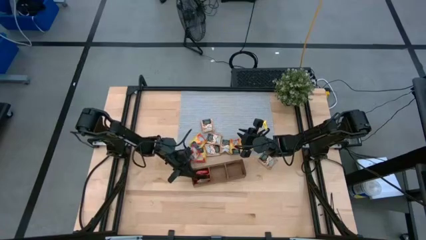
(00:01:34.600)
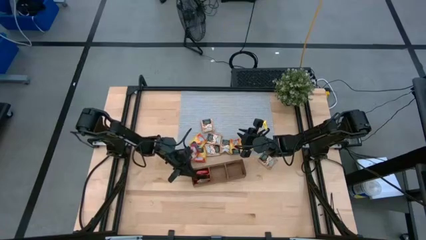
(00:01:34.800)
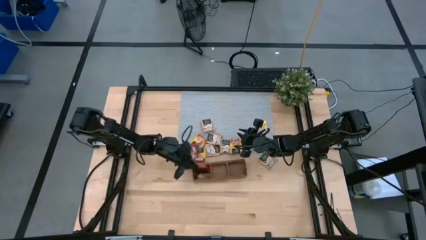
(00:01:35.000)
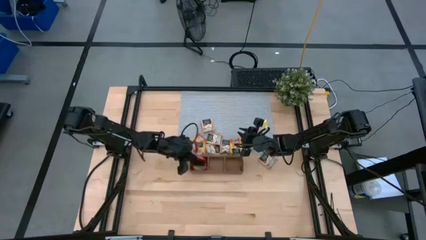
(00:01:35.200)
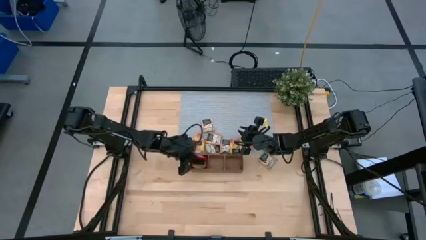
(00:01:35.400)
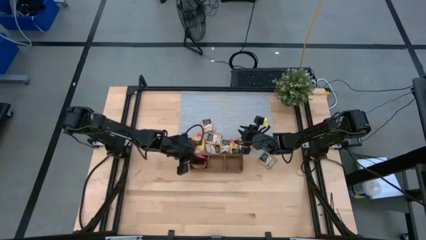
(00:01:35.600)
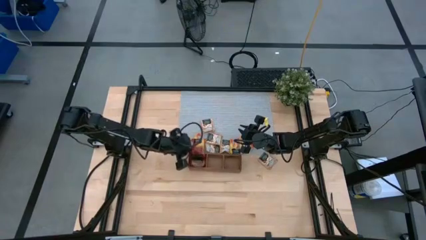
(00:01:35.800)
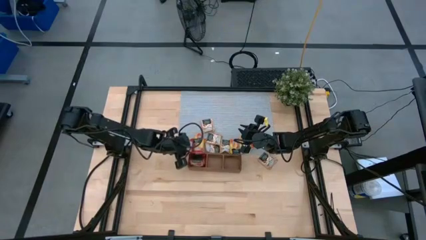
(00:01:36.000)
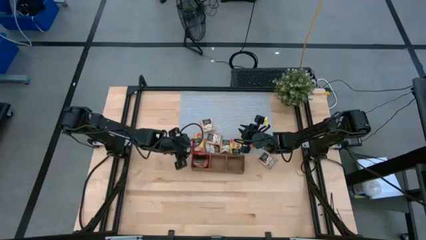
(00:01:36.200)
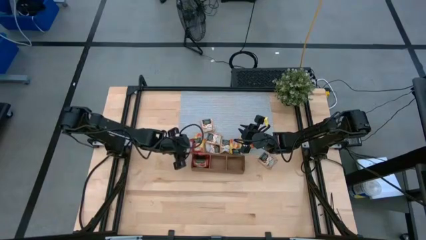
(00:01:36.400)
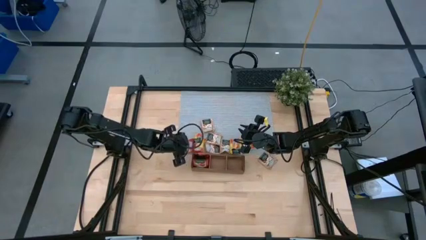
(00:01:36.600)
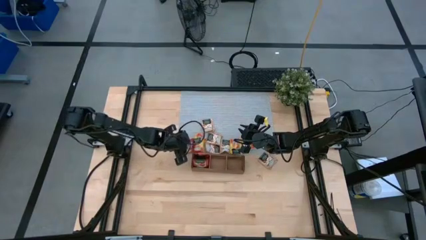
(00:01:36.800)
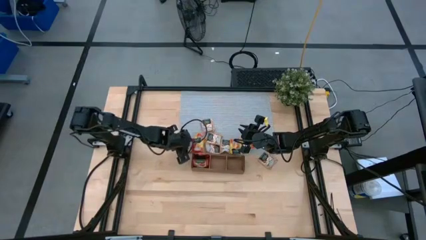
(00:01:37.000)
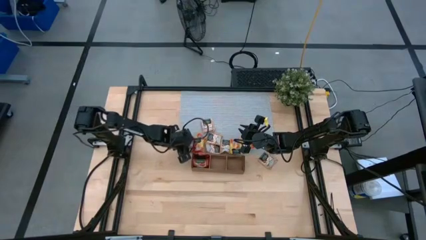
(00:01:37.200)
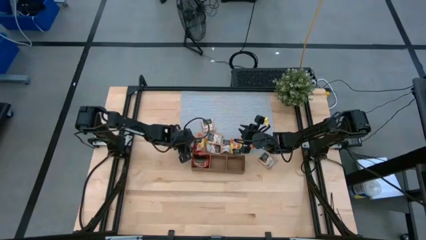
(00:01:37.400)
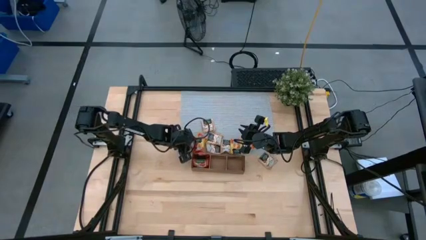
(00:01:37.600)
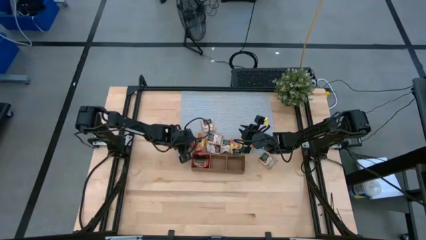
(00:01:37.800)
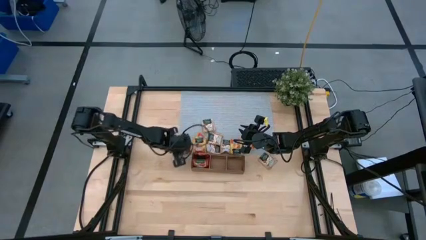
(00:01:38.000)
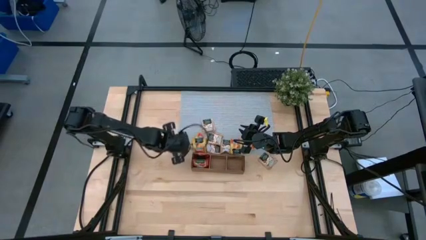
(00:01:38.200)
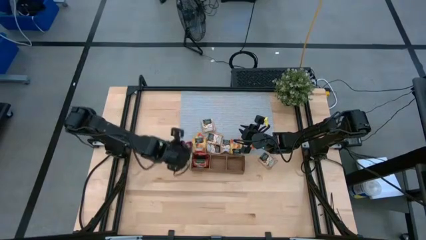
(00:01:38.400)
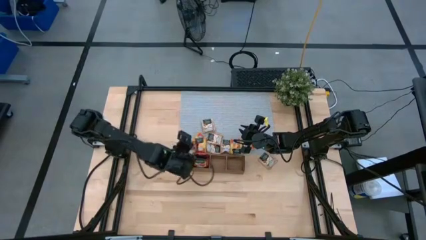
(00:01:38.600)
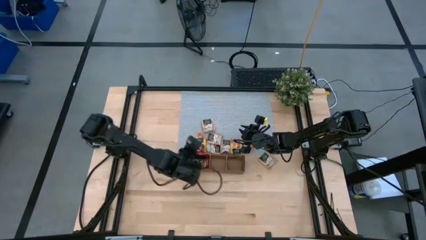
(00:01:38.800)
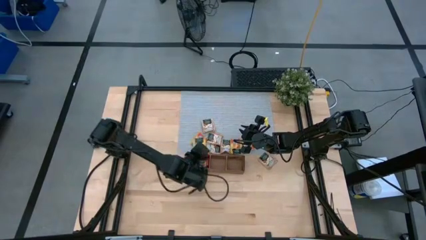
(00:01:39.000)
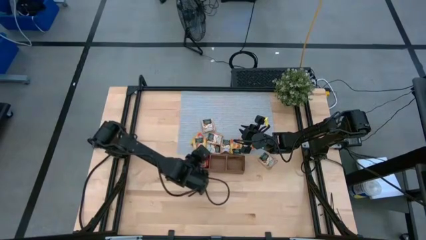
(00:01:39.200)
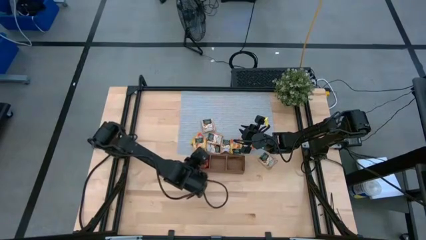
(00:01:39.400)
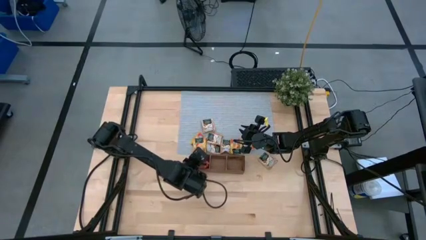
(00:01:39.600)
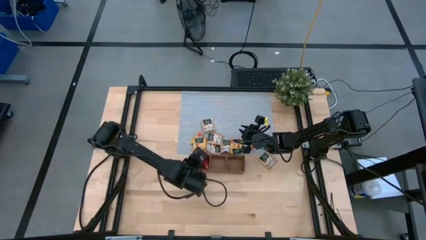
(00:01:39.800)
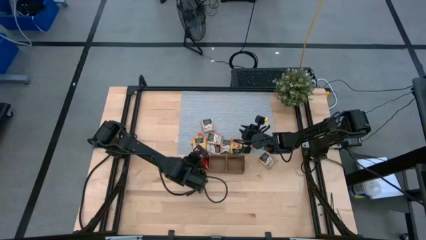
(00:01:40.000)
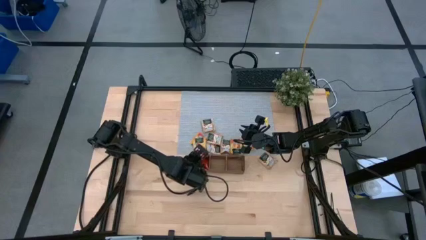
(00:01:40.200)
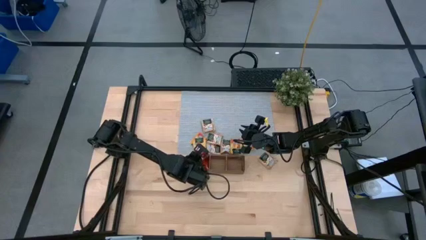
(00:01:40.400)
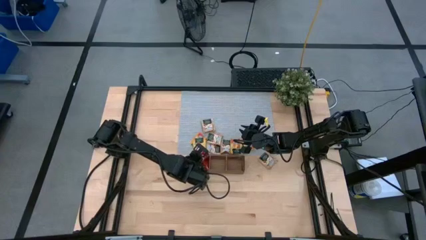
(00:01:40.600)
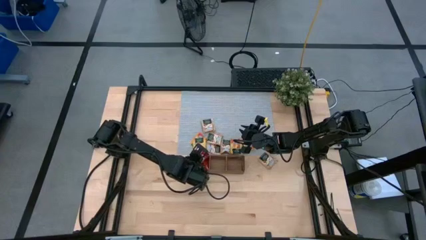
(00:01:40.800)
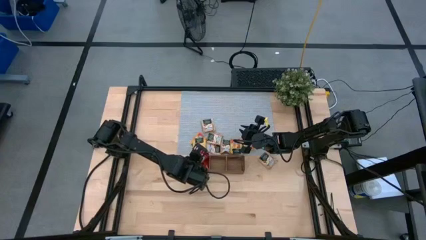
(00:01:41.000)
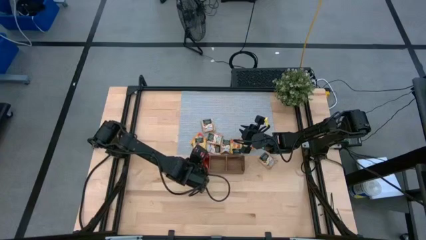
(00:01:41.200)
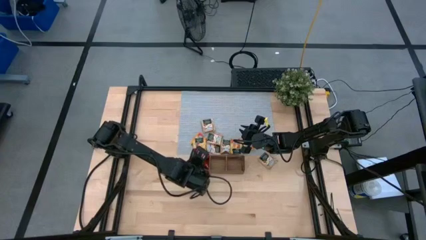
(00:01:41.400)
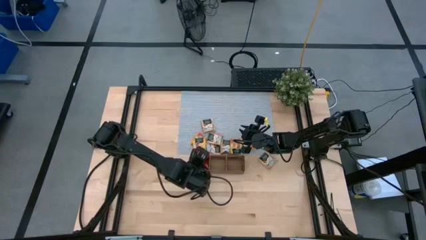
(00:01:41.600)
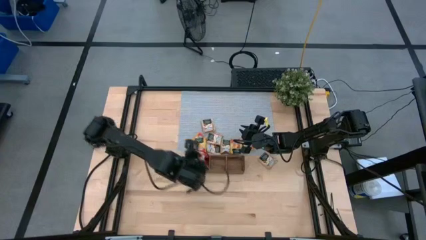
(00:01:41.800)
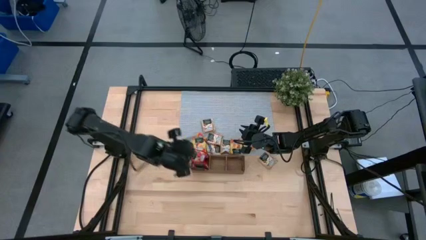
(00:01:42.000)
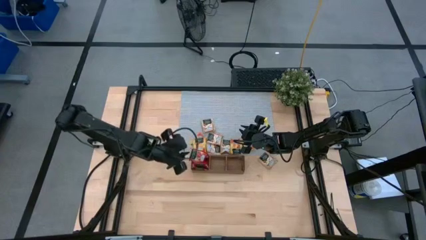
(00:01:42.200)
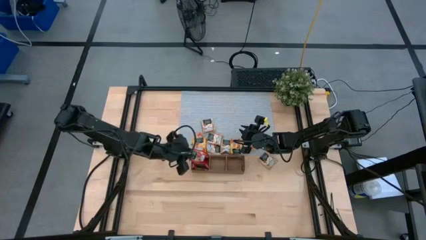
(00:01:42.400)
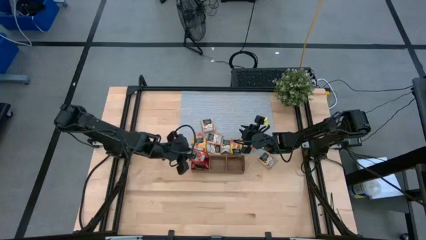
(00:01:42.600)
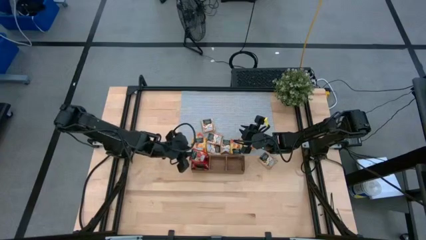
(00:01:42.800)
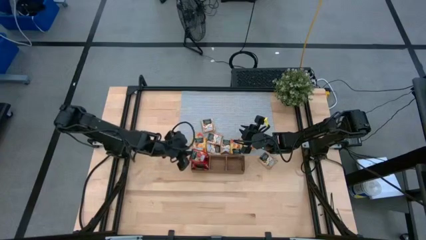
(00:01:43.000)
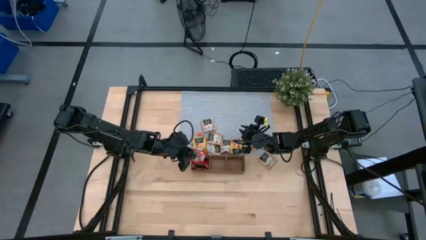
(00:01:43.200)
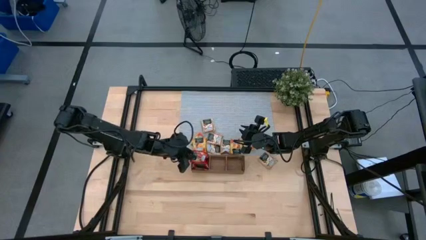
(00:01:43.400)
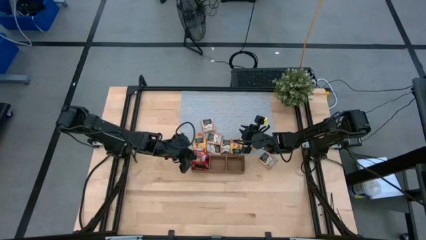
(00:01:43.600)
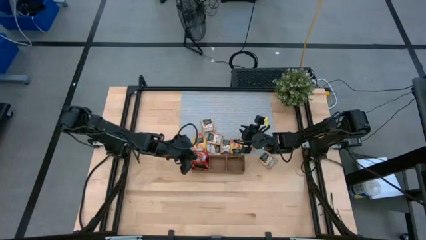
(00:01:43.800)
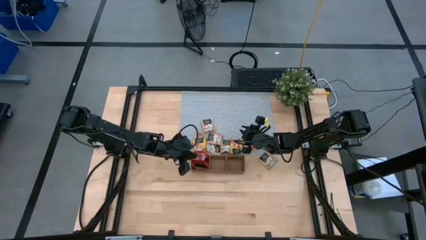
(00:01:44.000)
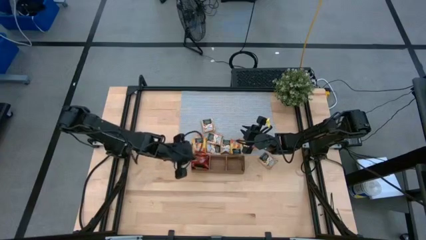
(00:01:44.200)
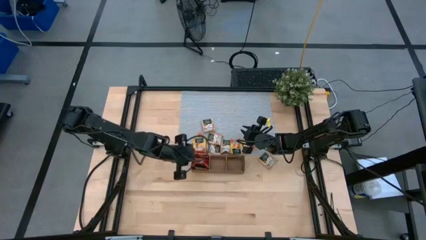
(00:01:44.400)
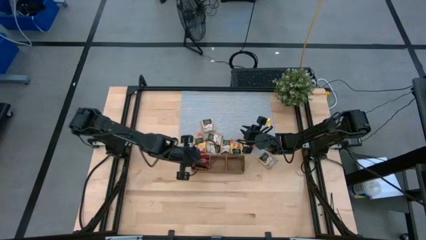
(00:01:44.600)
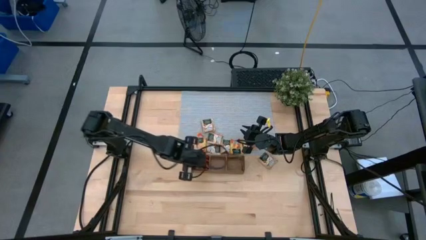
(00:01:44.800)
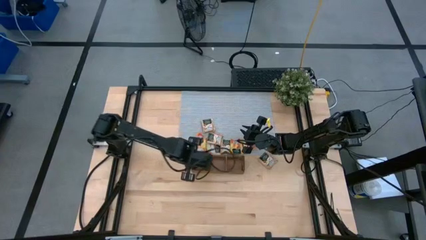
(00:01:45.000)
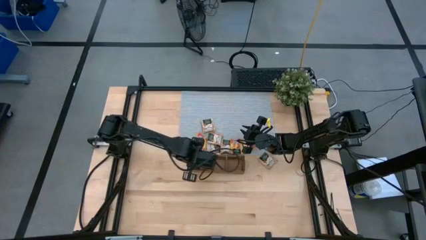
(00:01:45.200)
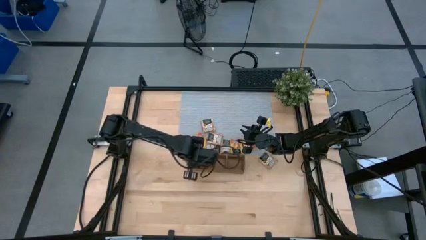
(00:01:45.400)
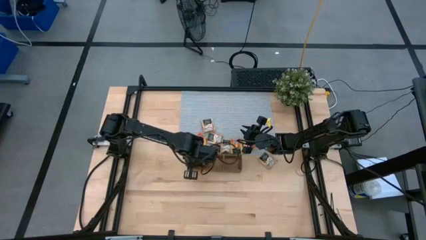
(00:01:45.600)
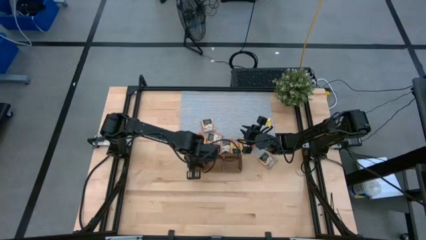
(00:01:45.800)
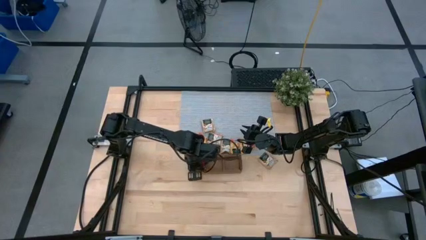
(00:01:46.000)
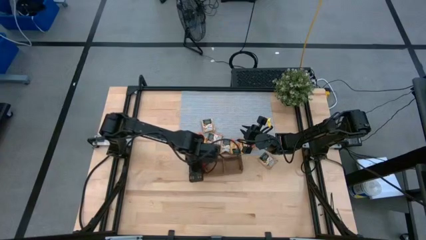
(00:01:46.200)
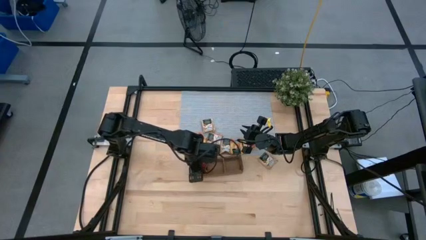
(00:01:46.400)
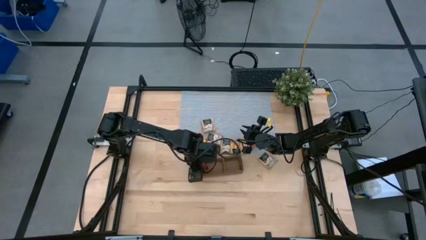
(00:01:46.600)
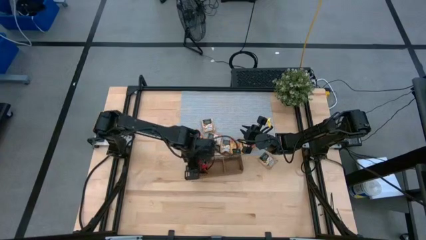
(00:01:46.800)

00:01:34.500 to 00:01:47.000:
Task: Pick & Place Tea
Put the red tea bag into the left section of the wooden organizer

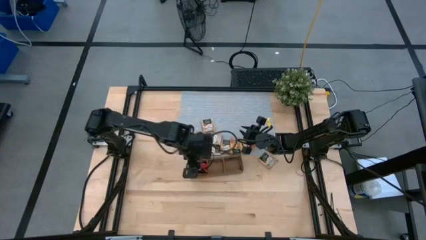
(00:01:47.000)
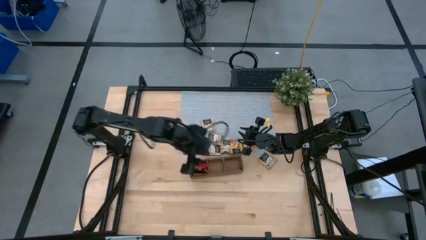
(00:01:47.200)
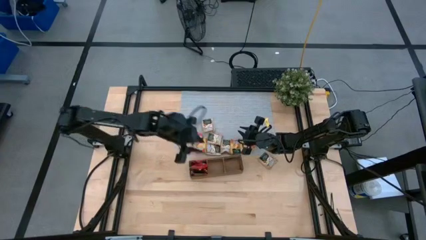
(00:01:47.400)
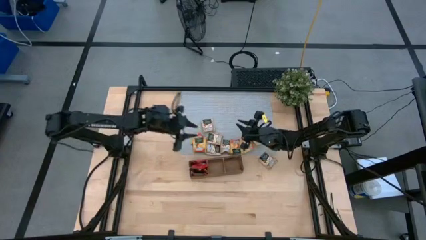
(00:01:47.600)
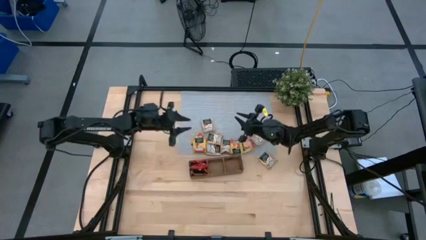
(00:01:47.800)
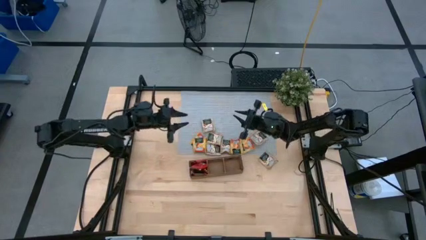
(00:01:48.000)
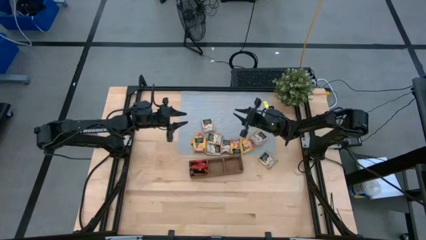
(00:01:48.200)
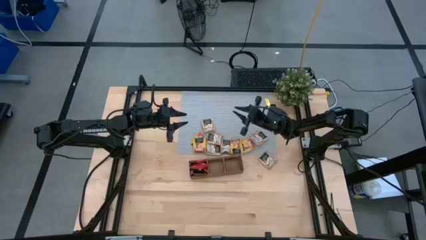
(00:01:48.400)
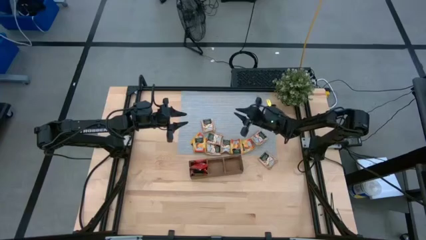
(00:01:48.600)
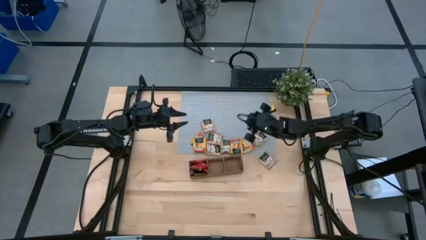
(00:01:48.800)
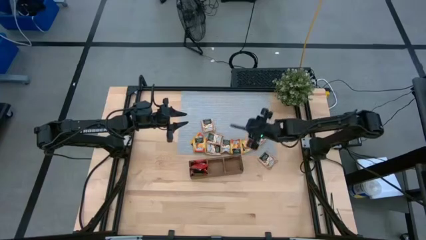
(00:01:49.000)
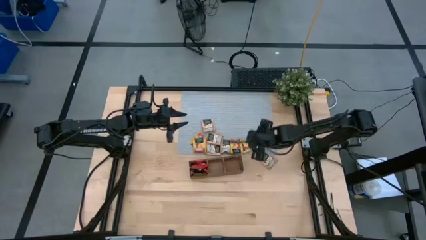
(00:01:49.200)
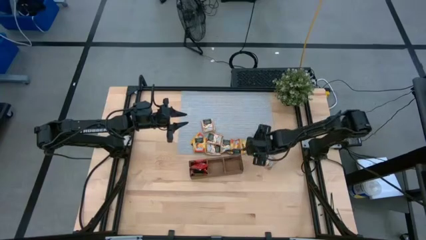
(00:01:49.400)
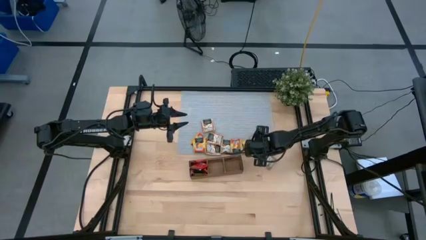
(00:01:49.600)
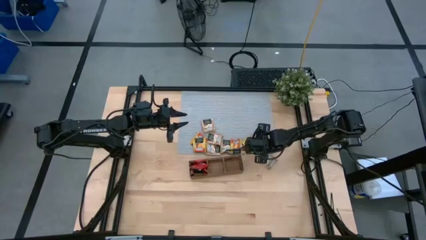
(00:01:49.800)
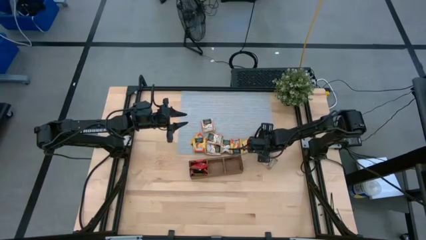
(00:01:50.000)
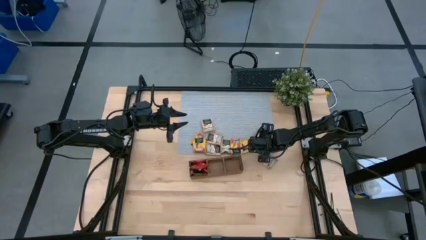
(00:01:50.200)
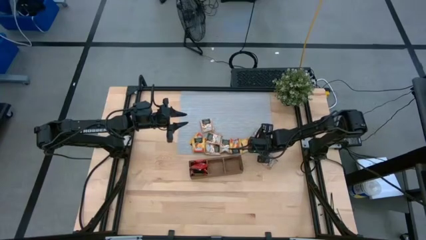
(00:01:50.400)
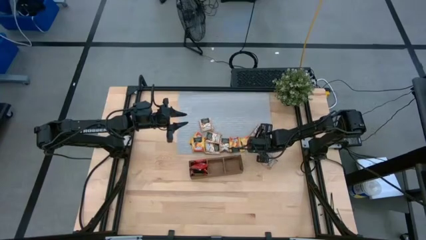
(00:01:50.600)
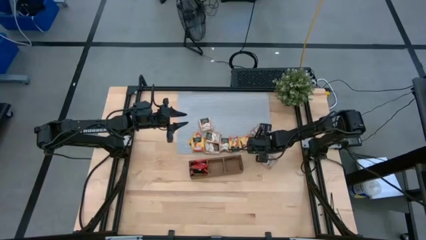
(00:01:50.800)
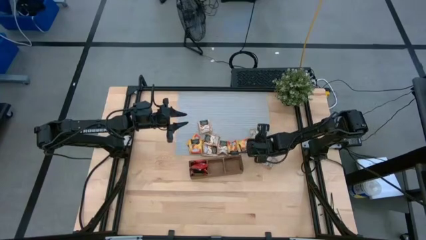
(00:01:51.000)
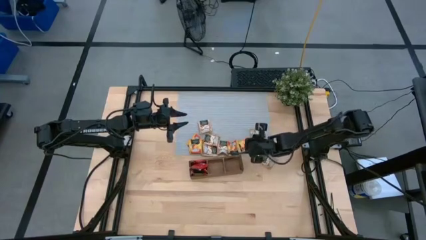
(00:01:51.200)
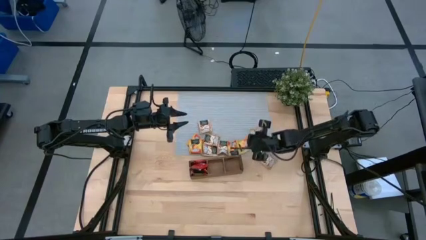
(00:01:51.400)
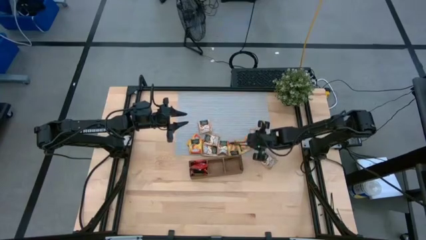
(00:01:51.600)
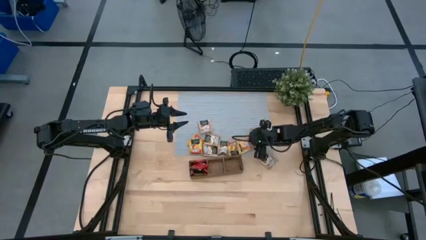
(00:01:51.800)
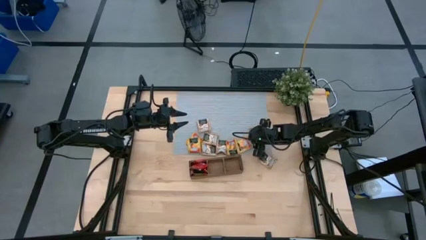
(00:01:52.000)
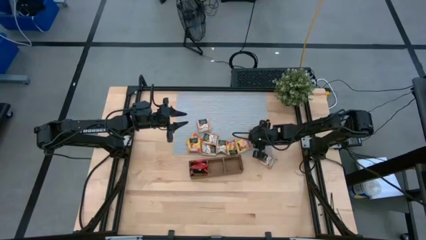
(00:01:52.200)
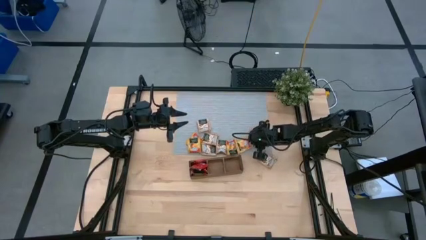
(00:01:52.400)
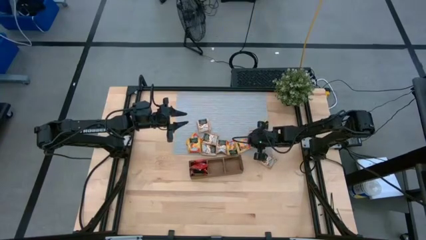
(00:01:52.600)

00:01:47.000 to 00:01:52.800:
Put the brown tea bag into the middle section of the wooden organizer
